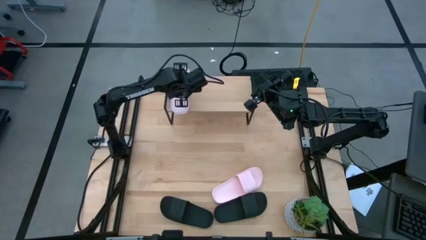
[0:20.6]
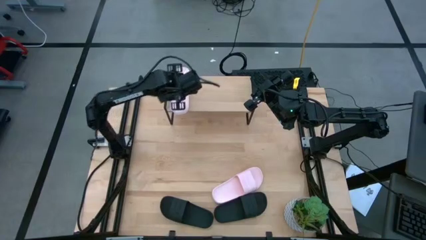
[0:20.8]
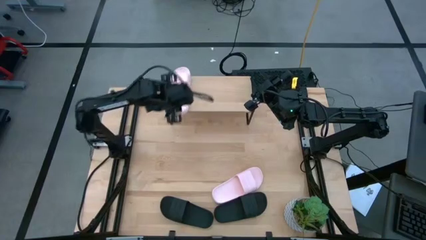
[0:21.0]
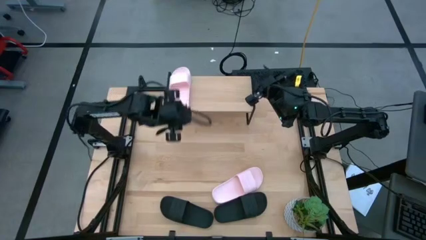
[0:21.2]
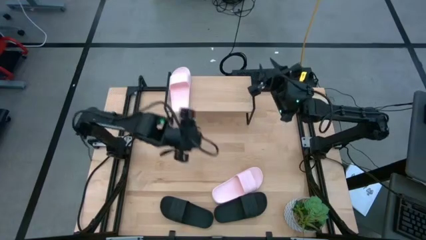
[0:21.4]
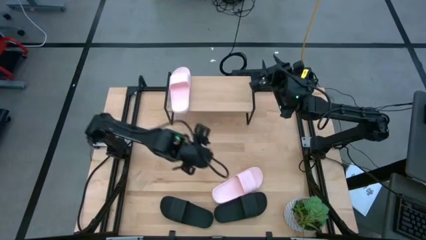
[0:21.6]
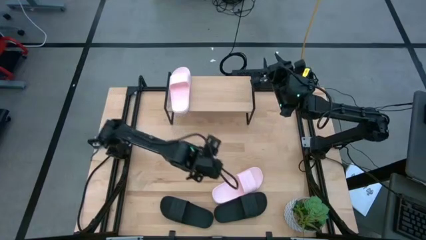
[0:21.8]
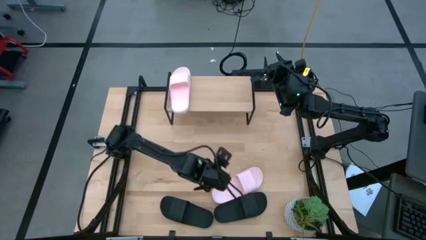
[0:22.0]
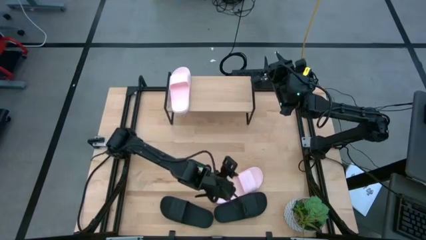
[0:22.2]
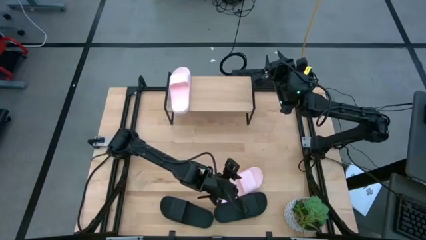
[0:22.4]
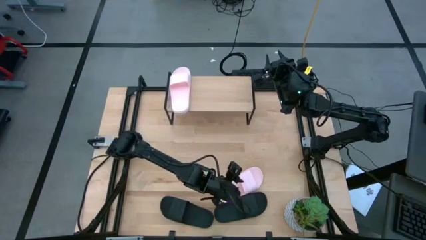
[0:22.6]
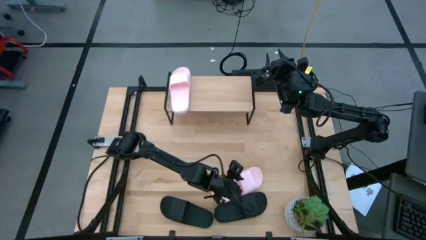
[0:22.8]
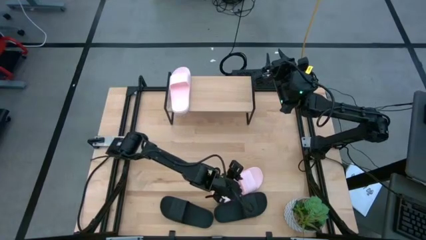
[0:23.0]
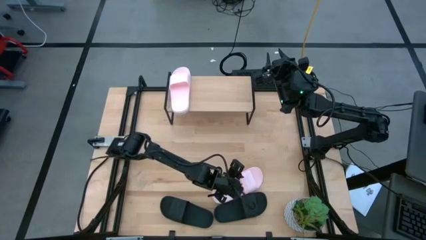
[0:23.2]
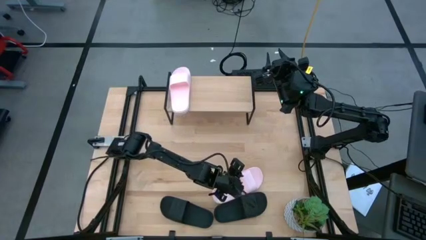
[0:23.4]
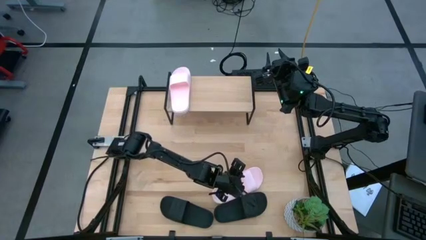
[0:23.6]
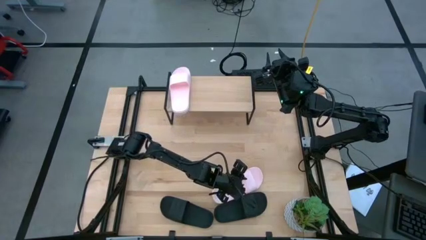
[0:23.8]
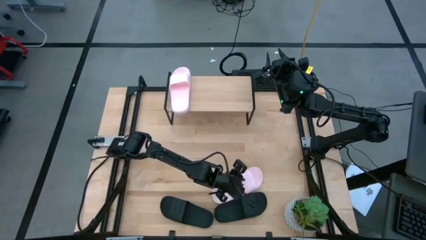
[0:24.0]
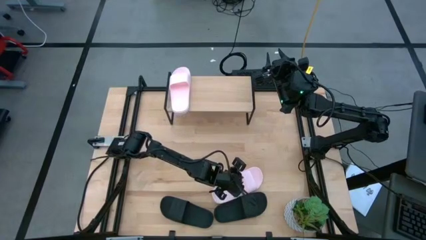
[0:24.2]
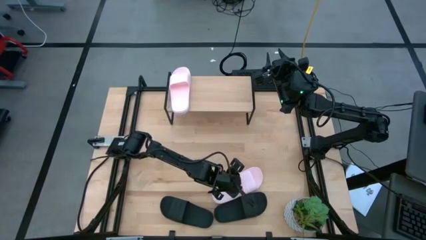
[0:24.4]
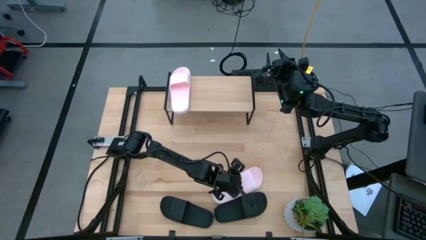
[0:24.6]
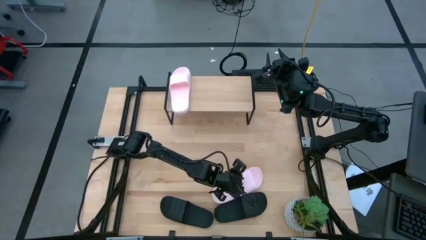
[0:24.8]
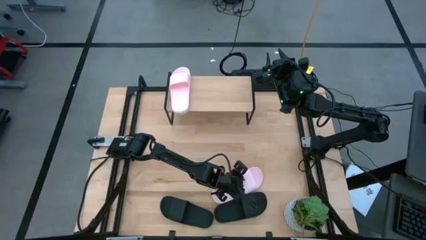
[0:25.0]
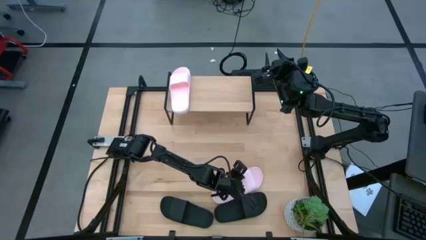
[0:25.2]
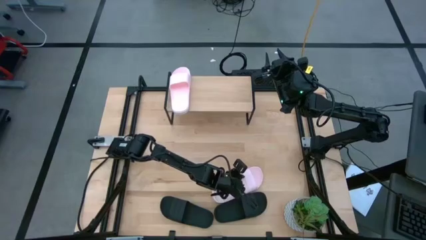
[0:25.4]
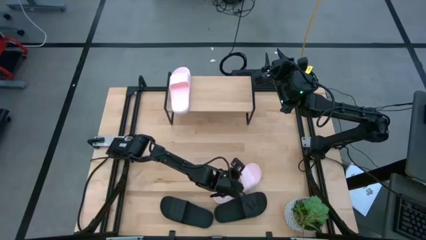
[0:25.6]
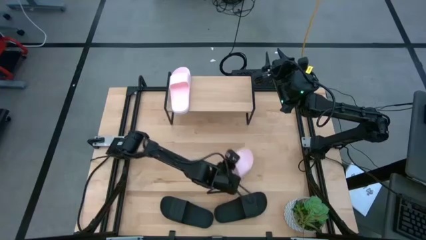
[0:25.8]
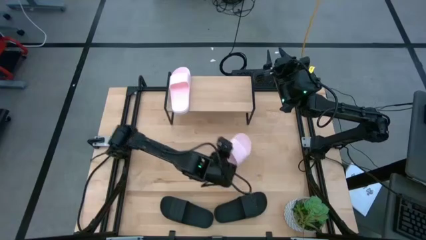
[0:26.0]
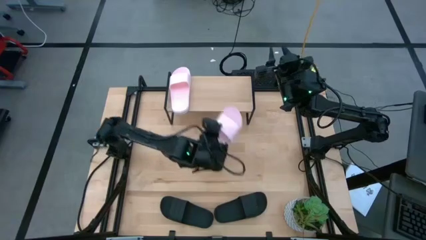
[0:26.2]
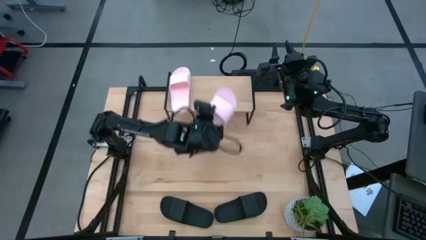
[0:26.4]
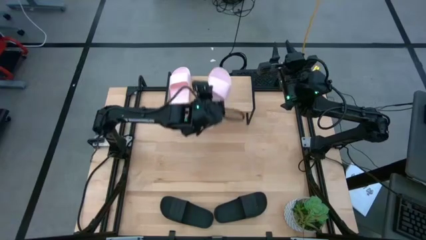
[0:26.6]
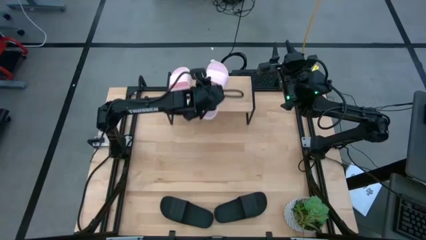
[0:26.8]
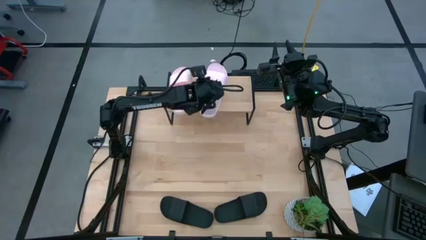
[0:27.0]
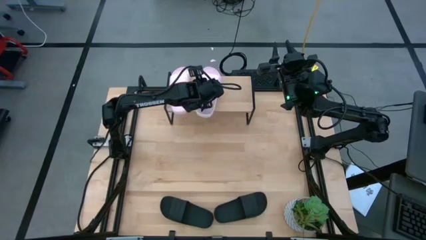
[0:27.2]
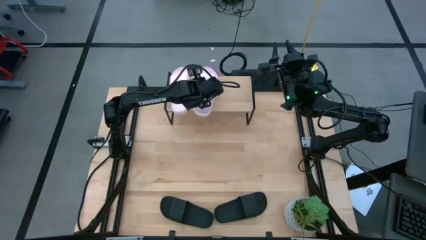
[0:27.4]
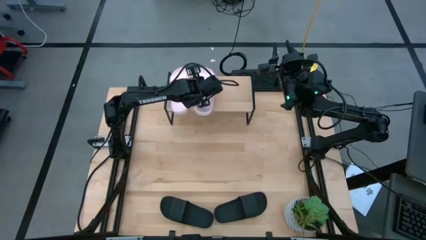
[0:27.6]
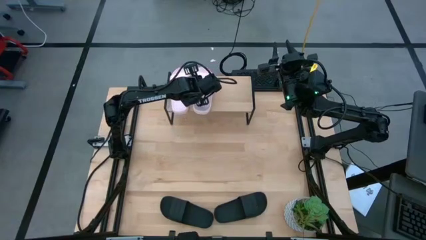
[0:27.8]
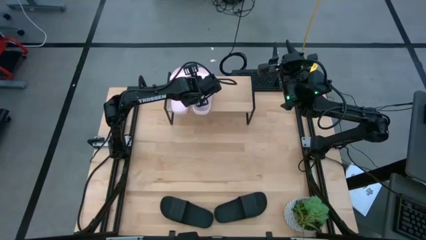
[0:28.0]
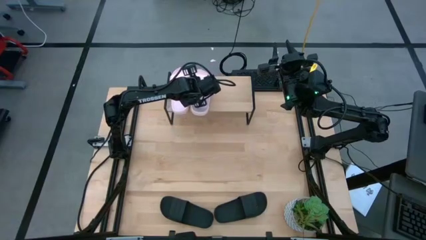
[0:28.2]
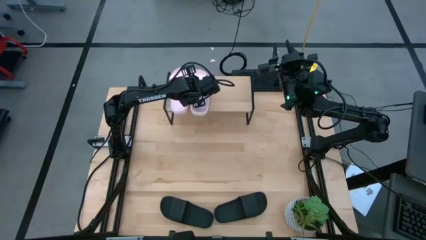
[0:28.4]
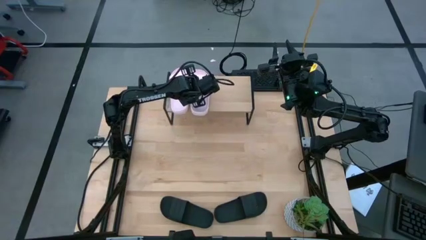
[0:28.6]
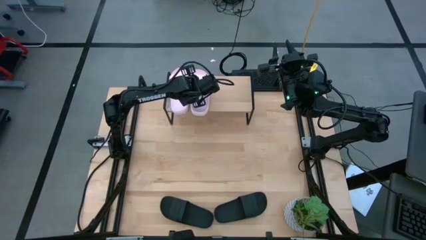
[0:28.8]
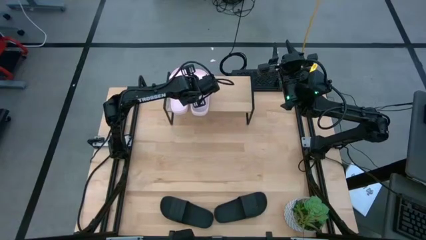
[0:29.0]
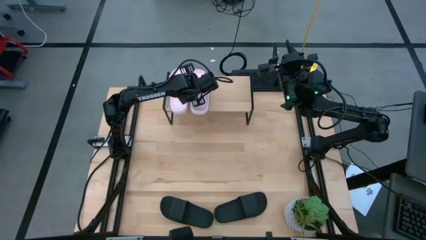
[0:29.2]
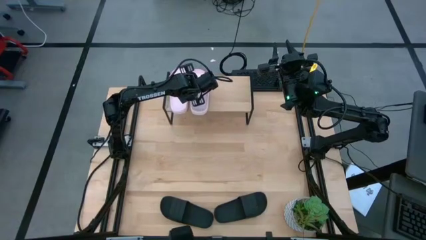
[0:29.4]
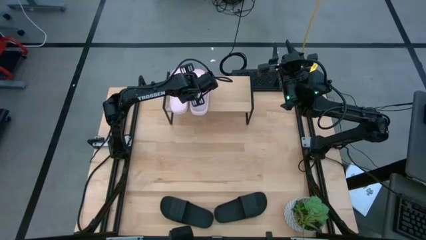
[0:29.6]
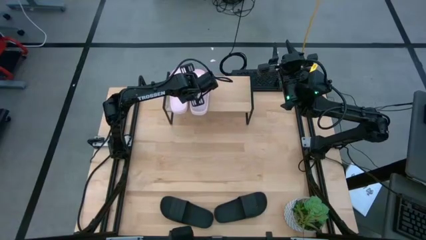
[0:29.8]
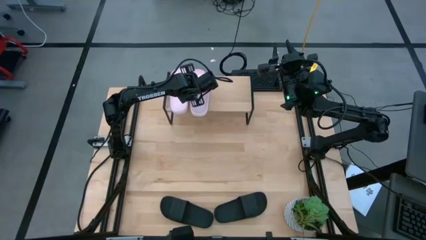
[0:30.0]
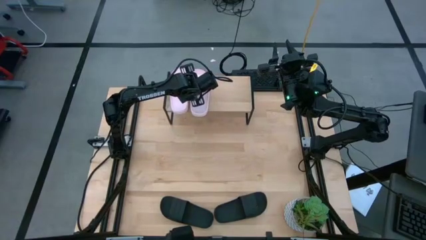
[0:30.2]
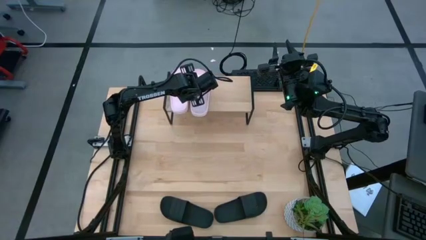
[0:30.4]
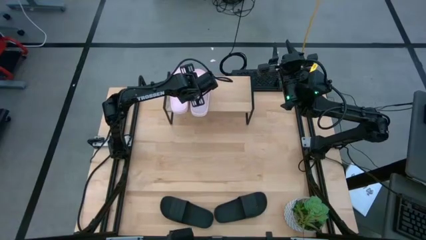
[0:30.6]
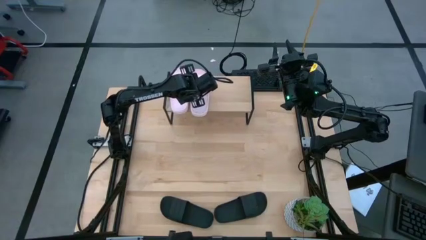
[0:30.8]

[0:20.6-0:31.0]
Task: Pick and place slides into the shelf
Put the pink slide on the shelf
